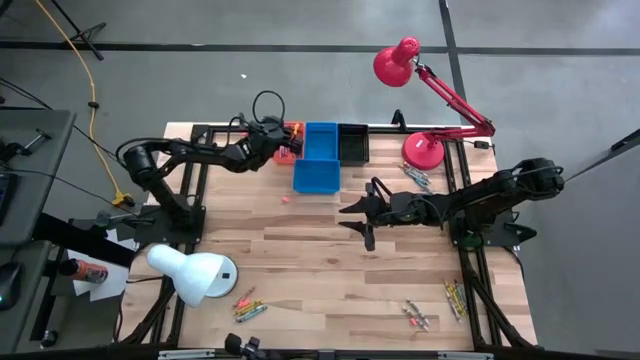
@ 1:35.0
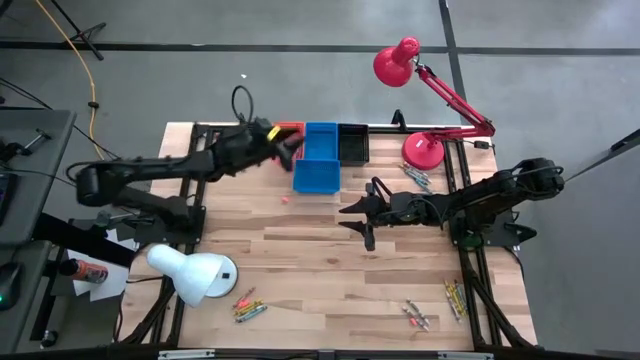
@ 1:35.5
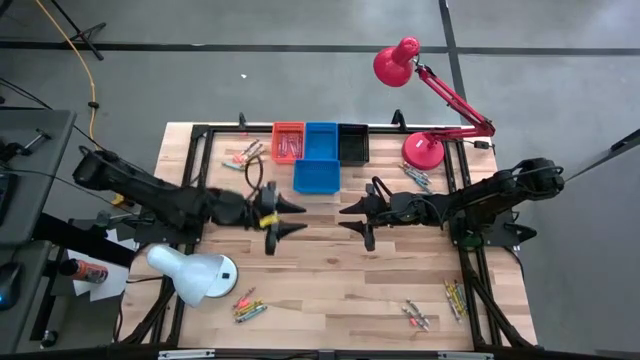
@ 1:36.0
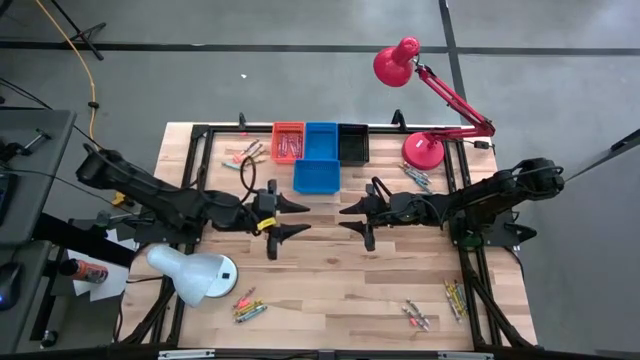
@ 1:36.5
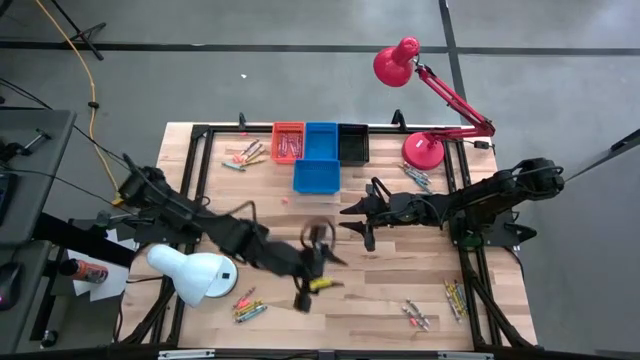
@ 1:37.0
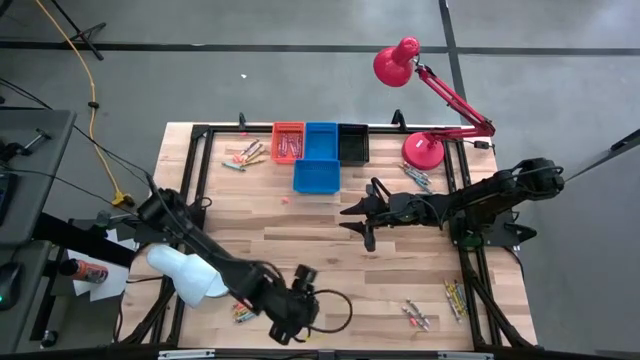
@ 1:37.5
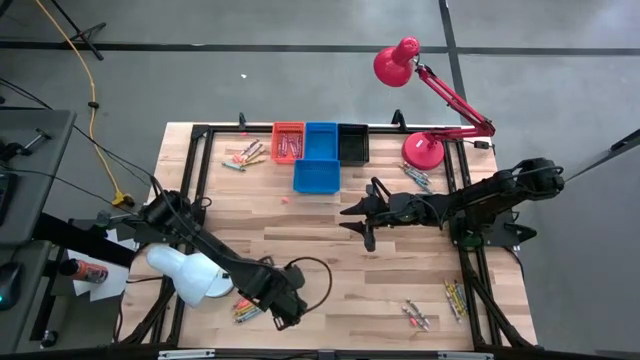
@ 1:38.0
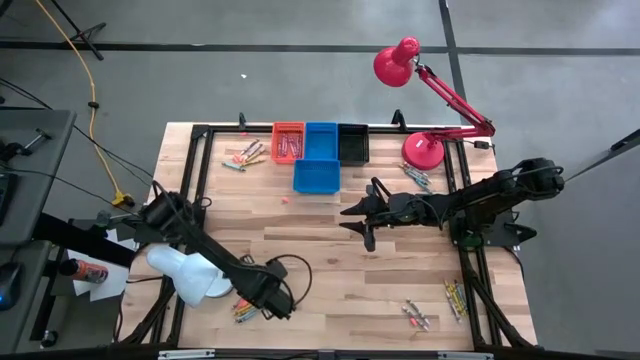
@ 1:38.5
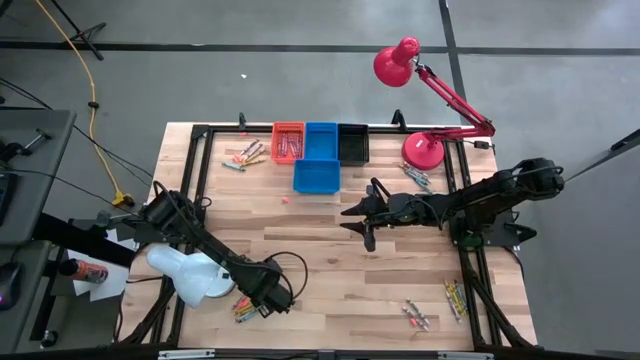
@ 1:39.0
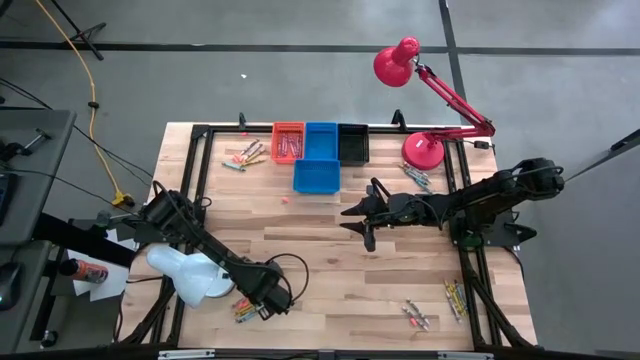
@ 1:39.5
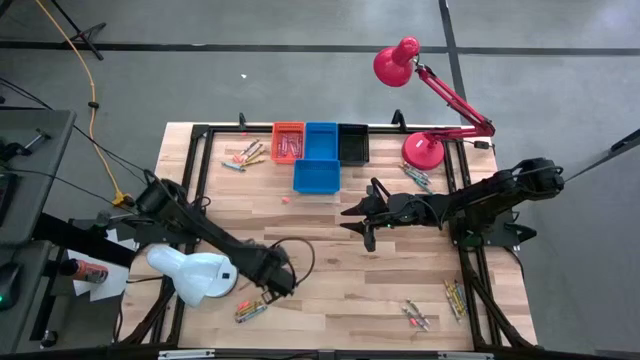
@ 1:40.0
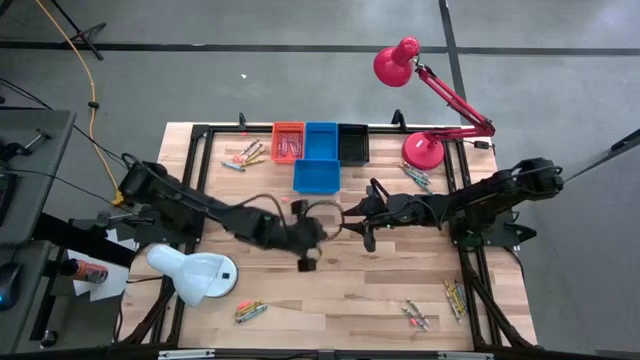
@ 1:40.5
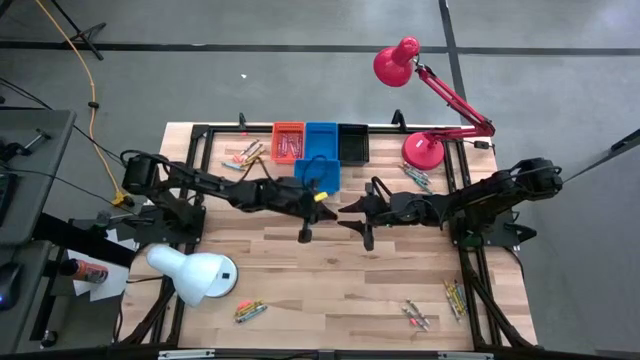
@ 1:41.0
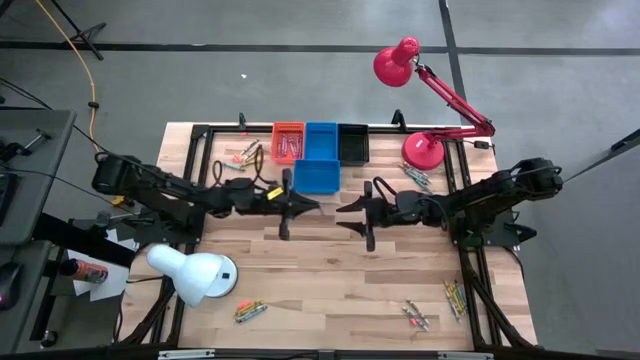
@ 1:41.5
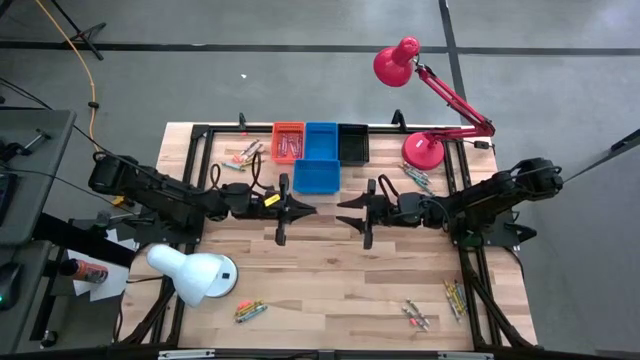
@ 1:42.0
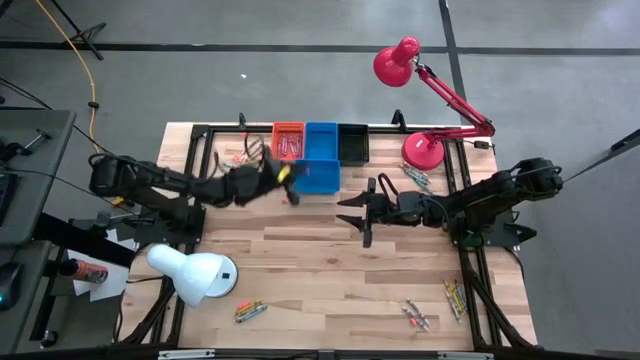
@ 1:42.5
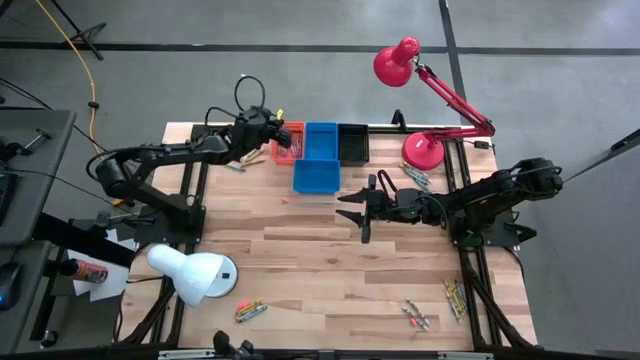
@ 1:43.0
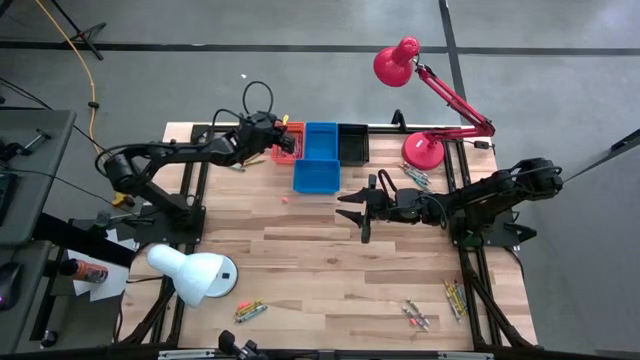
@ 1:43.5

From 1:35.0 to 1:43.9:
Task: Sort crayons
Put the pink crayon into the orange bin

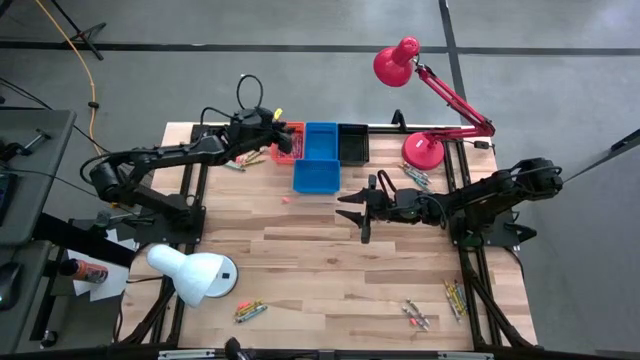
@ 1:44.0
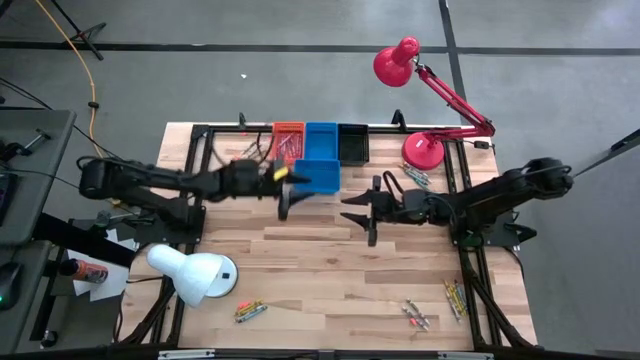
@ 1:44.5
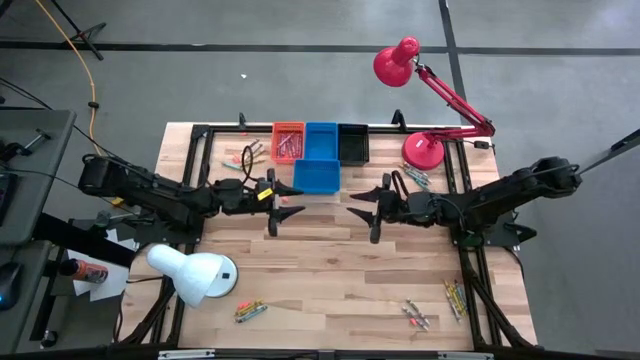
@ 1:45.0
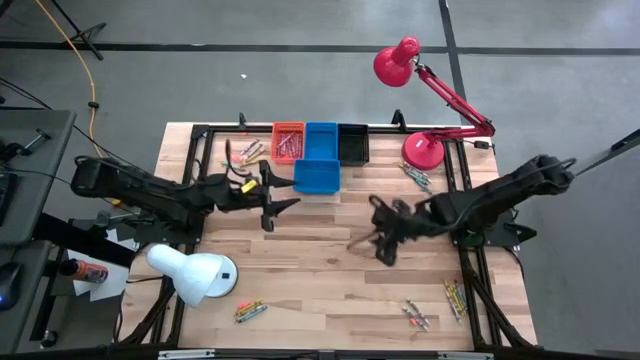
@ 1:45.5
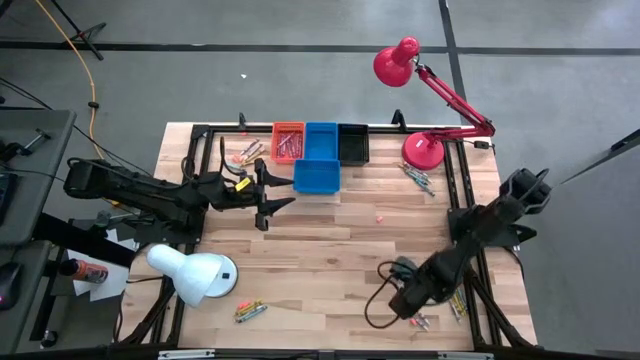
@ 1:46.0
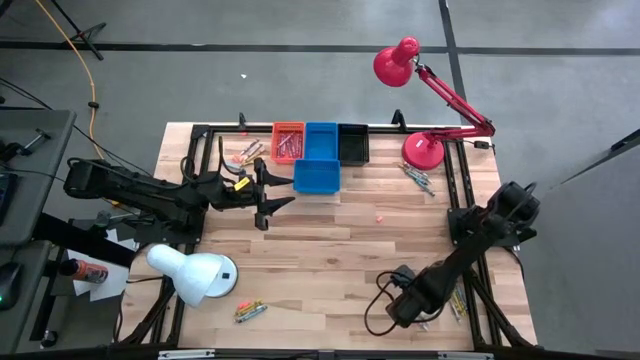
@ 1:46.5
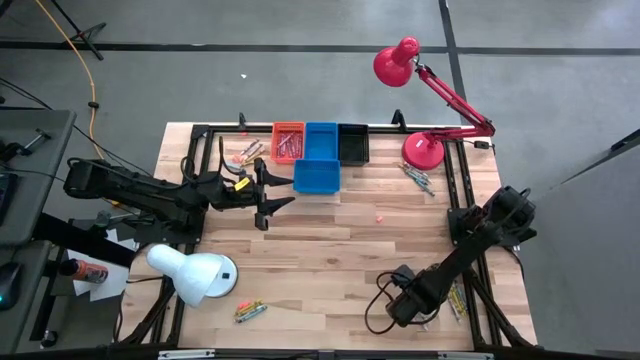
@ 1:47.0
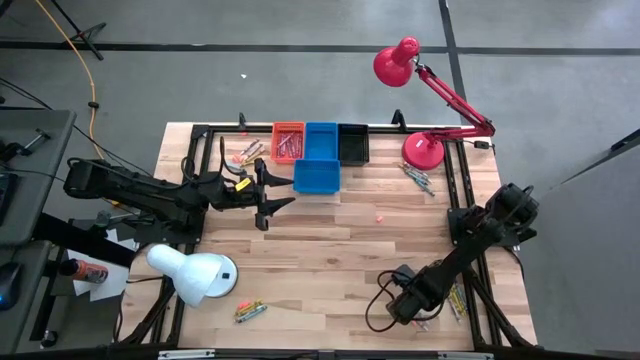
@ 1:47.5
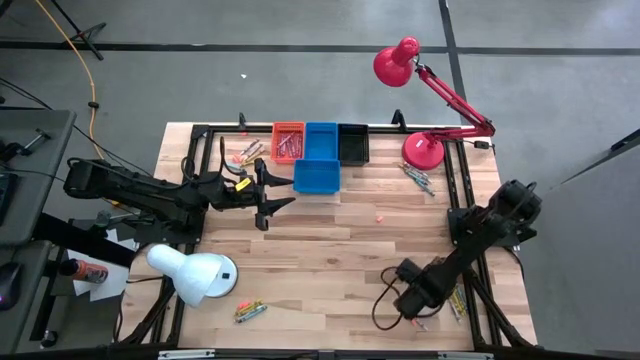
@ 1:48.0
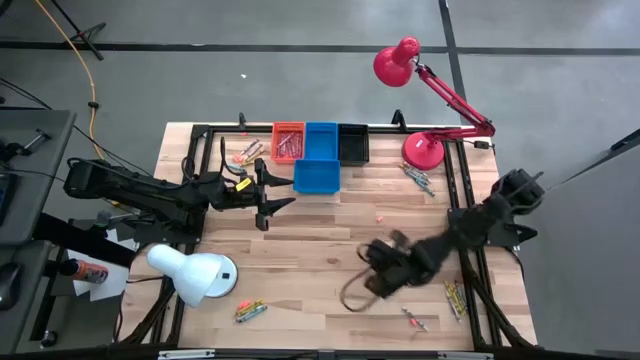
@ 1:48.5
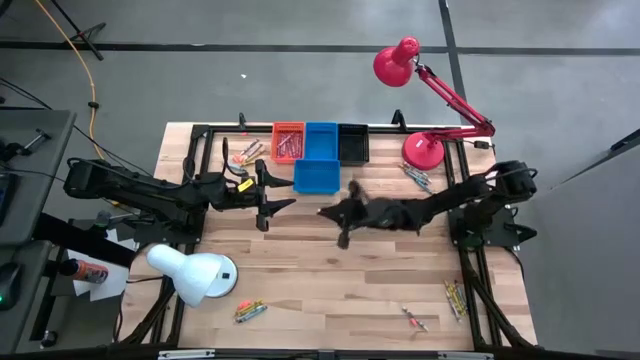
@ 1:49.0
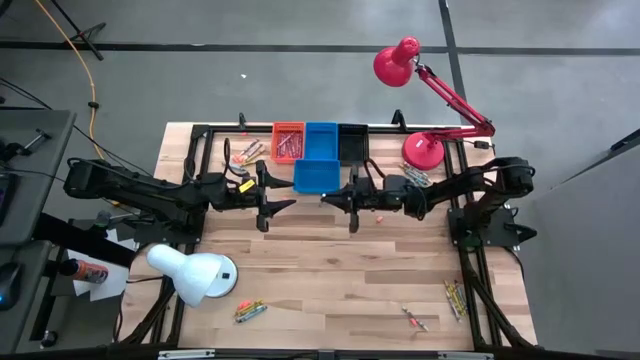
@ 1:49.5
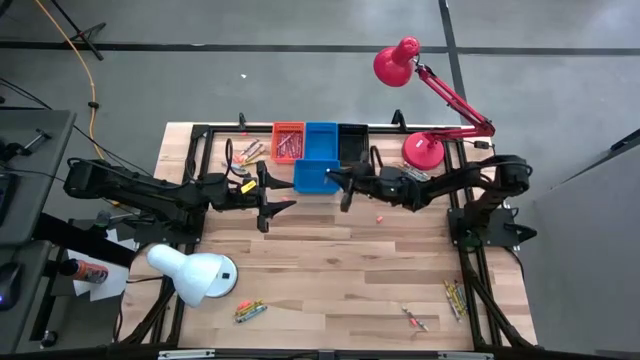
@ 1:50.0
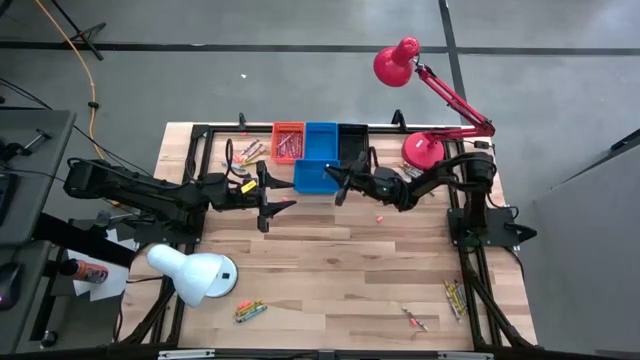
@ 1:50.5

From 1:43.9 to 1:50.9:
Put the white crayon into the bottom blue bin

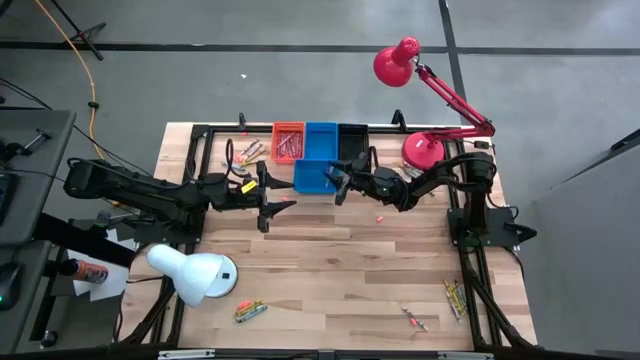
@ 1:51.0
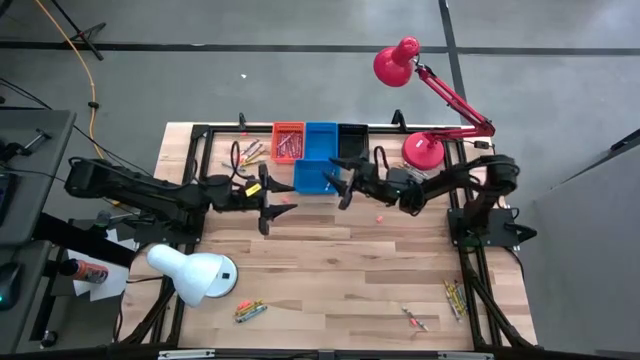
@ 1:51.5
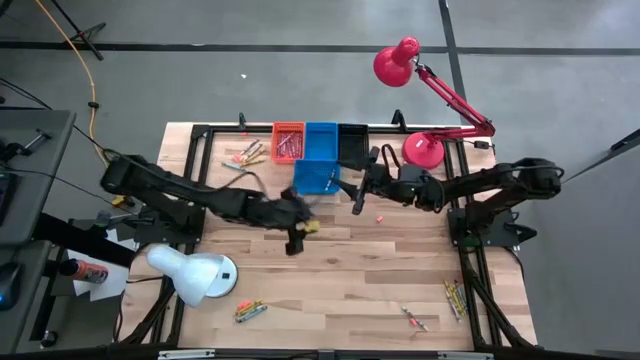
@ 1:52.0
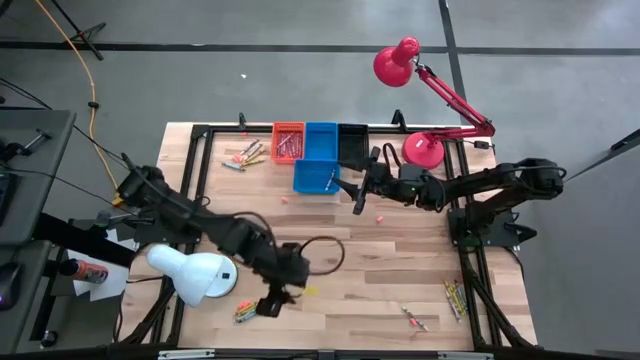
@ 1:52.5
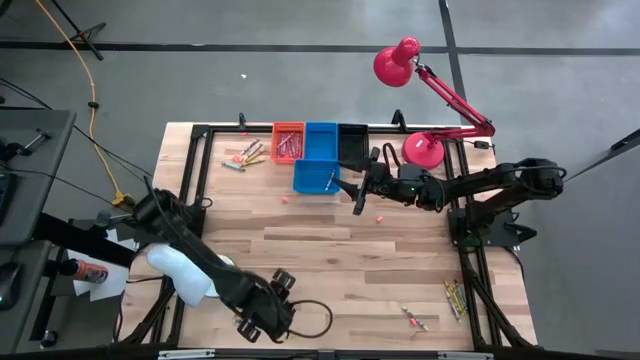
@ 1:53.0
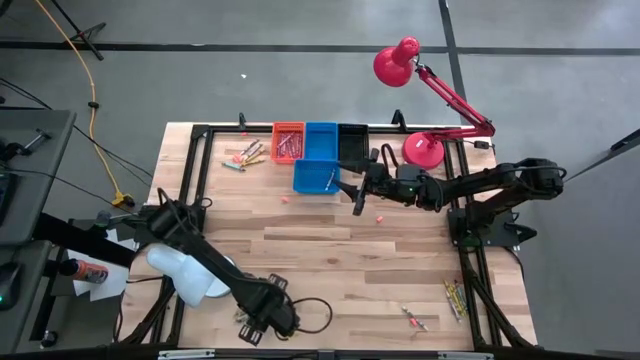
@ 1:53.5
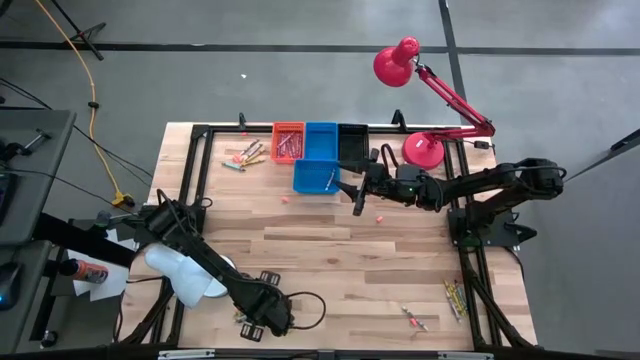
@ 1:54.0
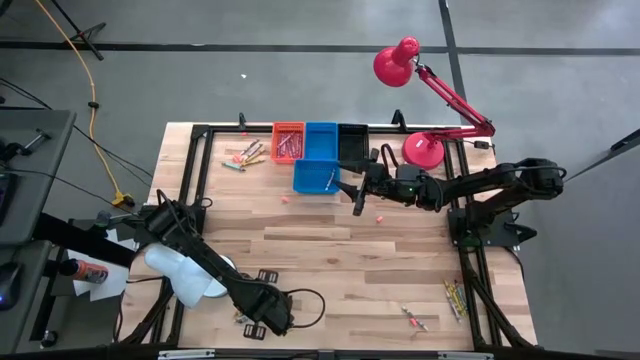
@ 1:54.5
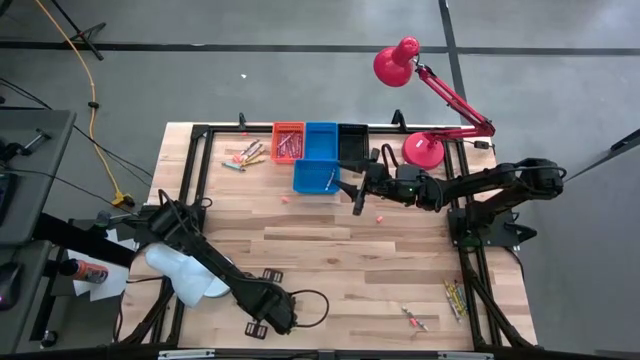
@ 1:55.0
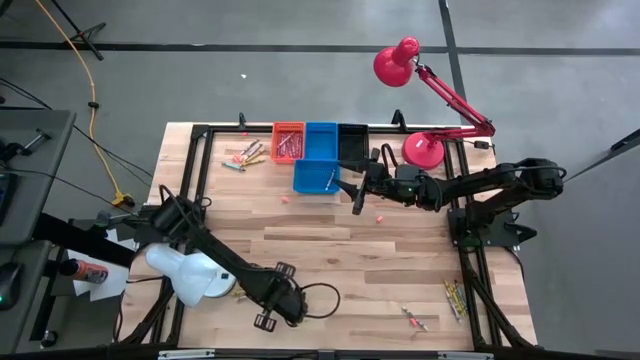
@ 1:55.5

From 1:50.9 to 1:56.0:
Put the blue crayon into the black bin
